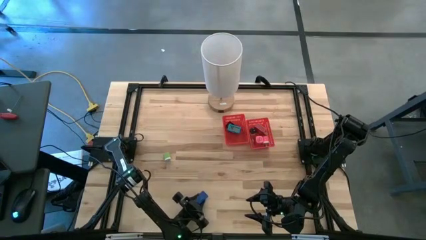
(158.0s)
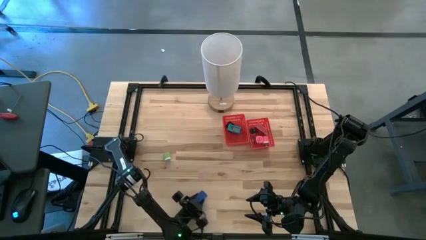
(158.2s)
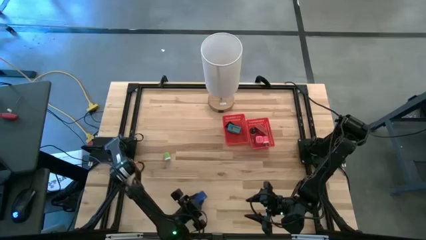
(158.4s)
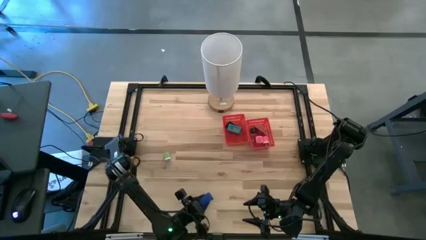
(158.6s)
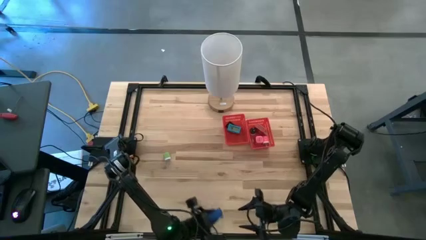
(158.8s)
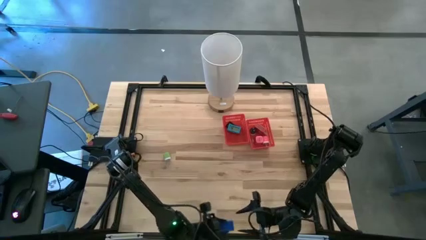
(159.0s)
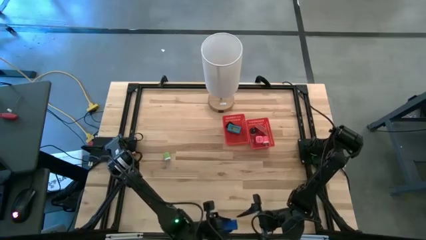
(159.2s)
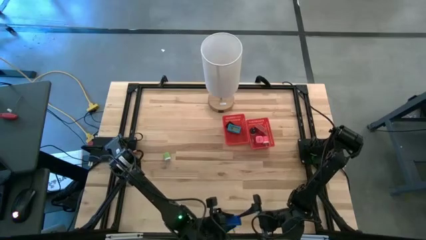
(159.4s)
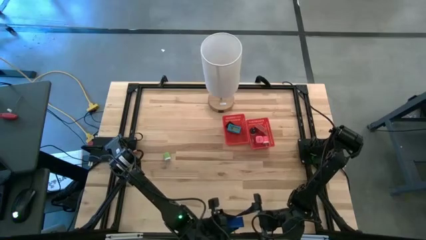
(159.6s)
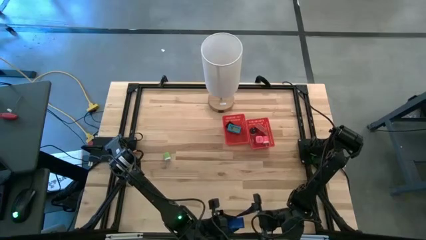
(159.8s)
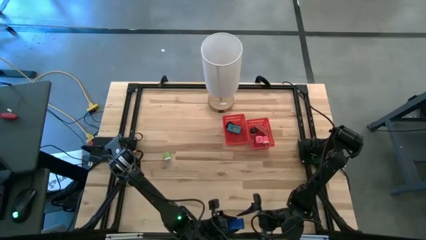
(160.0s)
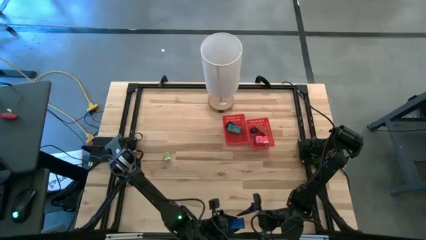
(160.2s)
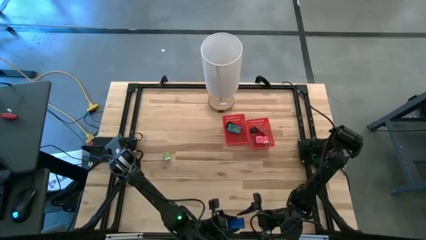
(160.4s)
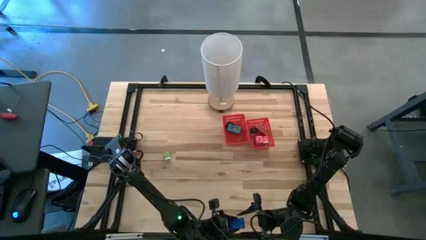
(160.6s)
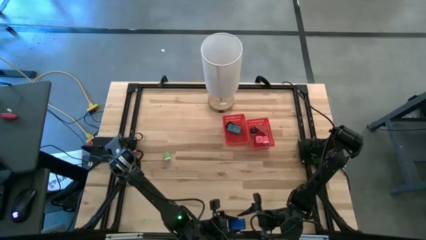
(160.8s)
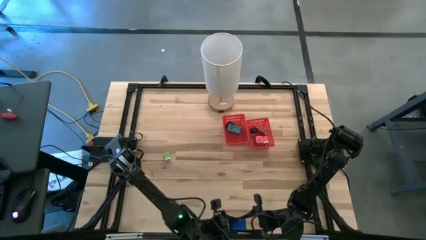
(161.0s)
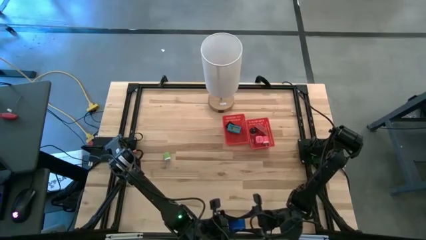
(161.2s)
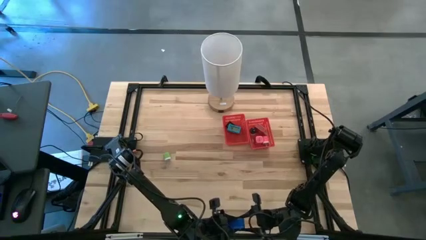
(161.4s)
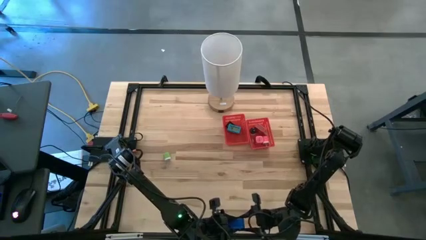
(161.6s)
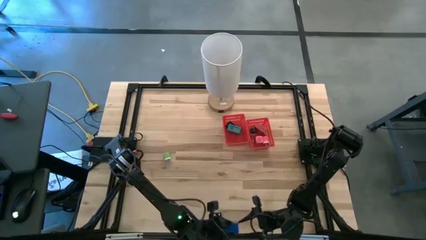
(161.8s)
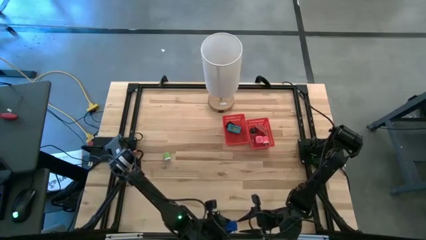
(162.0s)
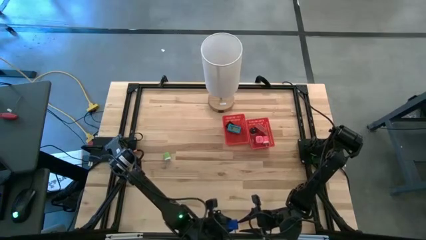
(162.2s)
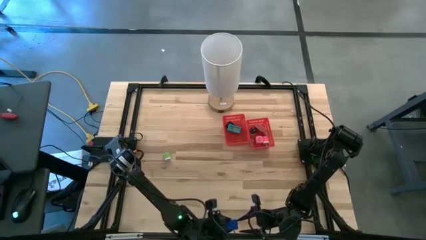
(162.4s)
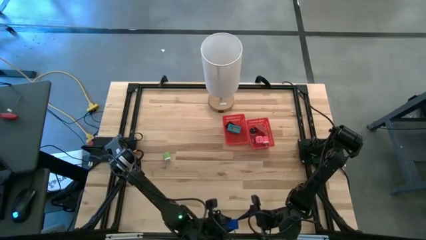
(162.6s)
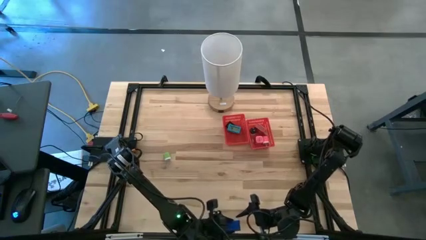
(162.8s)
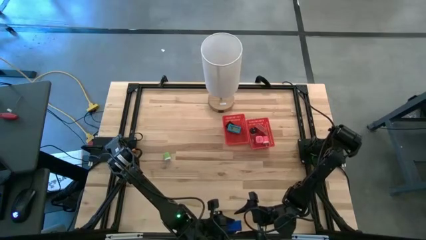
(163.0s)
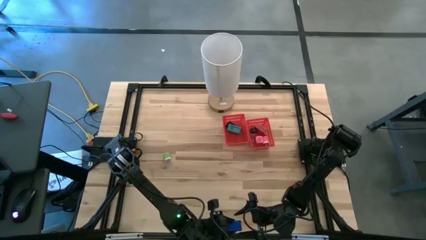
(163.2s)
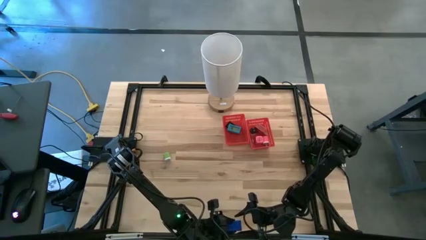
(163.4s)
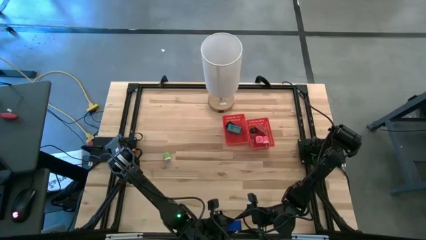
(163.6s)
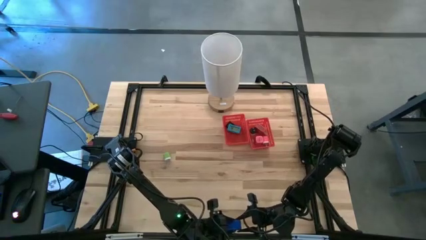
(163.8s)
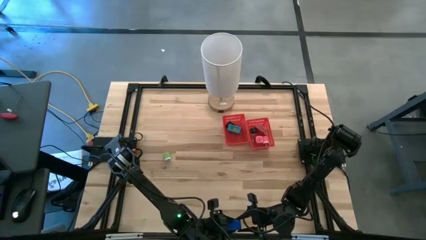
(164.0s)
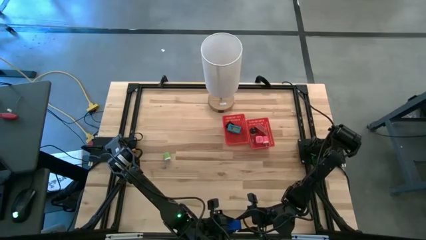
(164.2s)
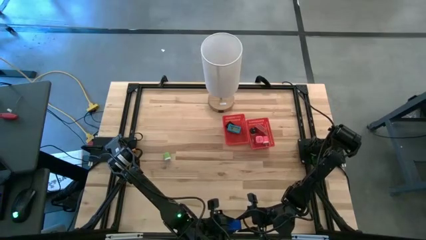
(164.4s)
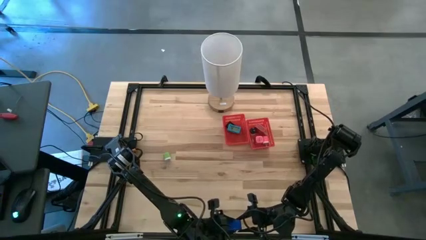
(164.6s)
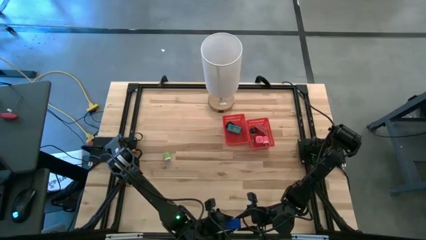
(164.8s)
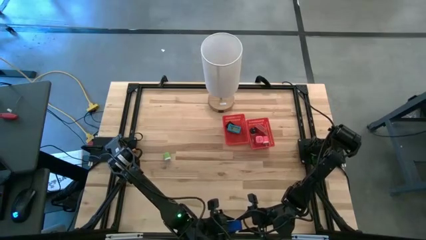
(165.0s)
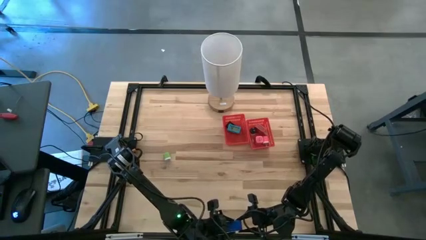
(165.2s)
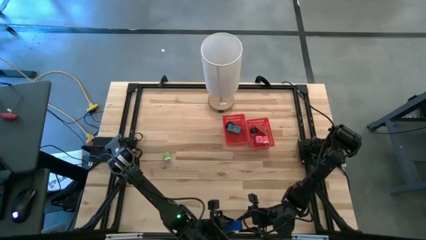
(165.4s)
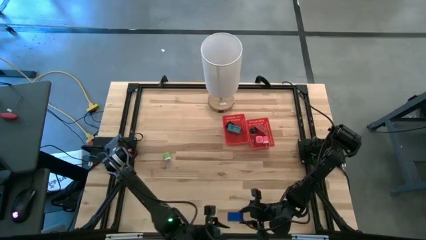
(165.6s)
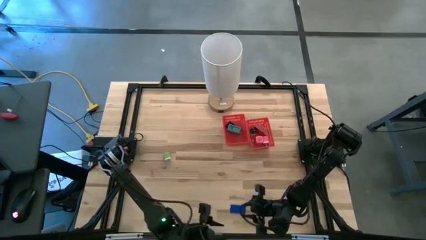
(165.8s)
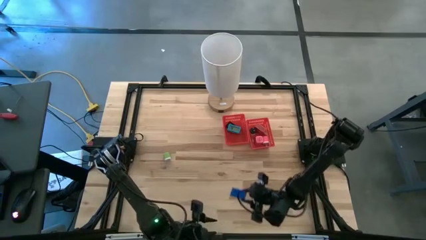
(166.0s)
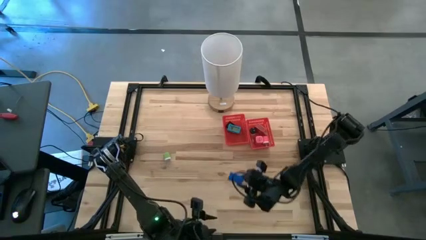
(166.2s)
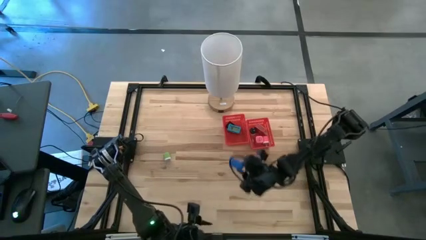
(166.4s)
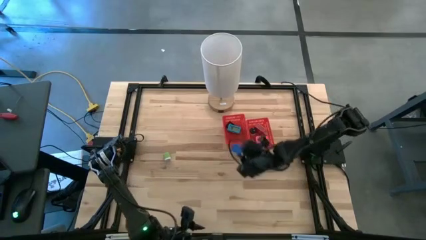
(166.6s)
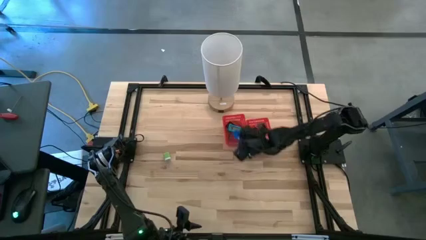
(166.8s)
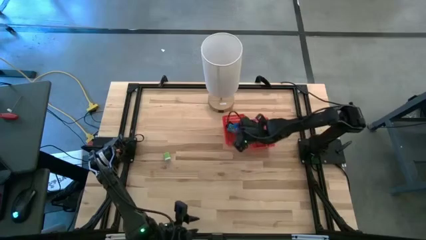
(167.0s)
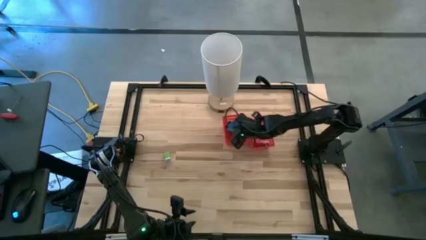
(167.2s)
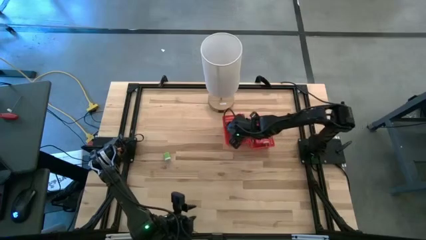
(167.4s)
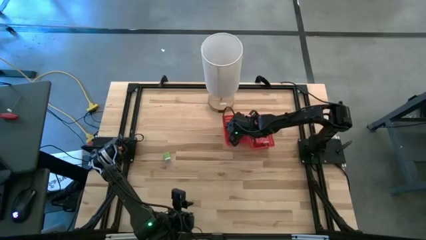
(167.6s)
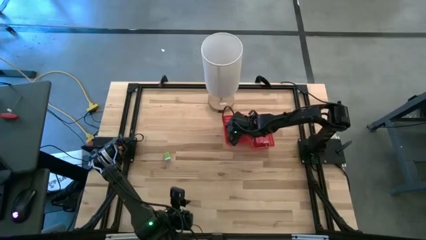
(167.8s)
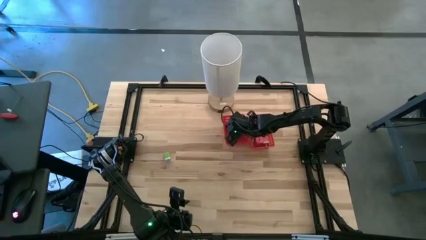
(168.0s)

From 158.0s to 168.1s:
Task: Pick & Place Office items
Put the blue timer into the left red bin

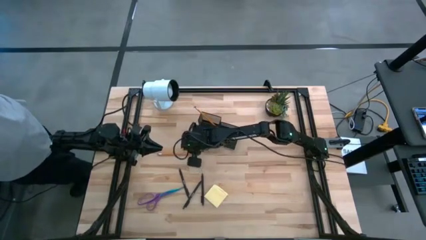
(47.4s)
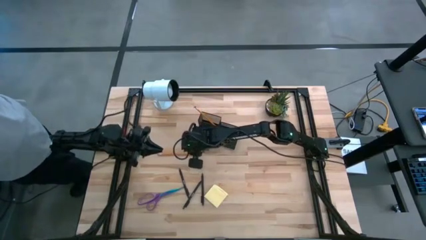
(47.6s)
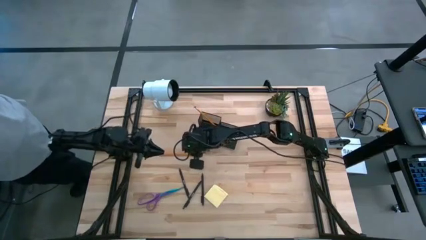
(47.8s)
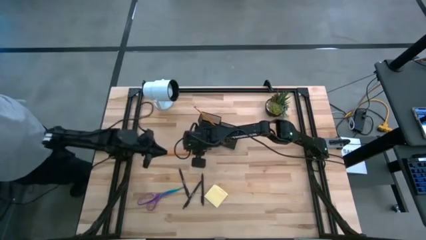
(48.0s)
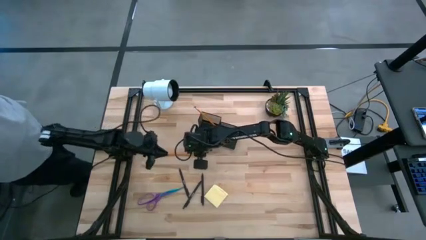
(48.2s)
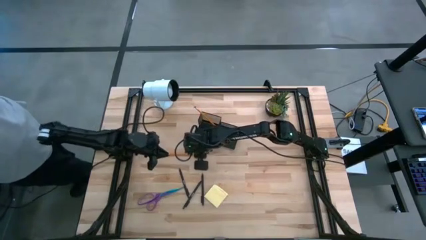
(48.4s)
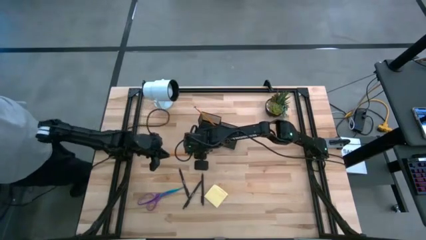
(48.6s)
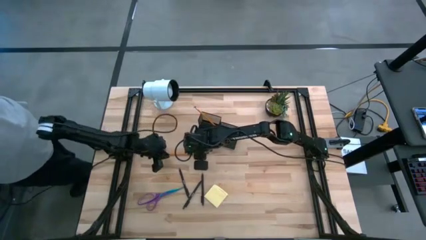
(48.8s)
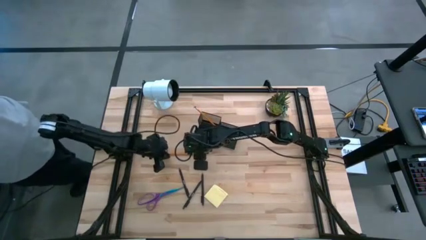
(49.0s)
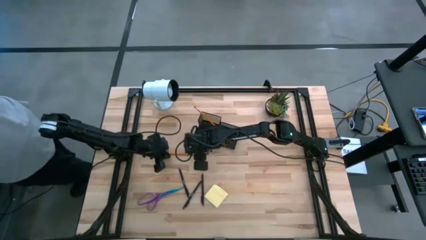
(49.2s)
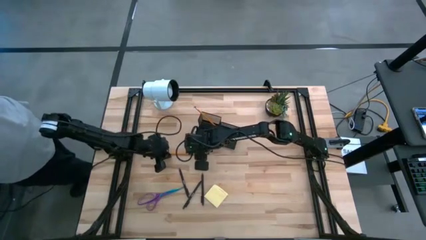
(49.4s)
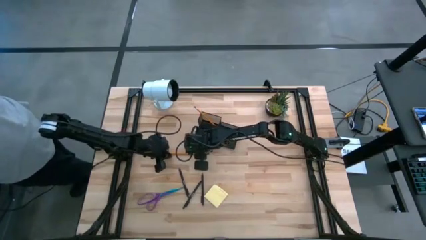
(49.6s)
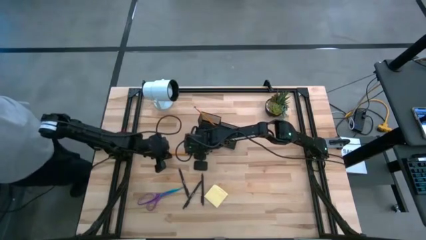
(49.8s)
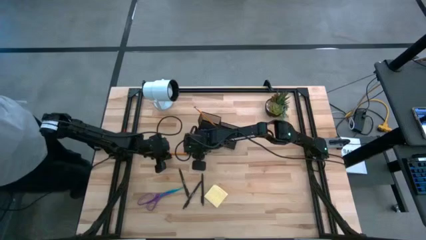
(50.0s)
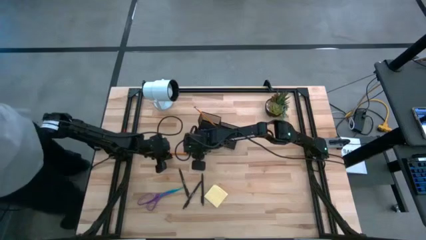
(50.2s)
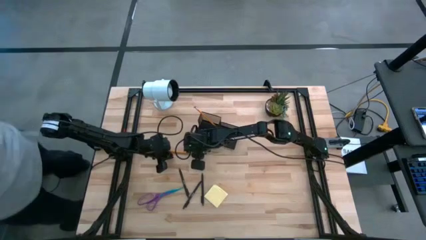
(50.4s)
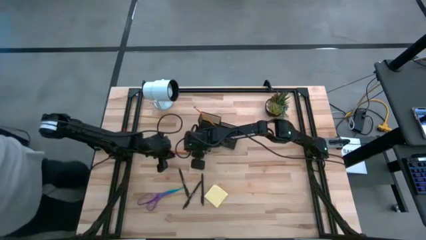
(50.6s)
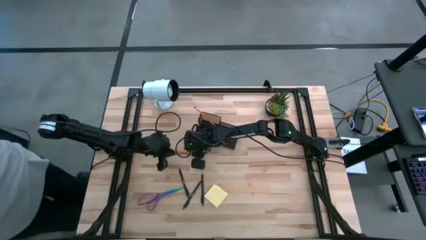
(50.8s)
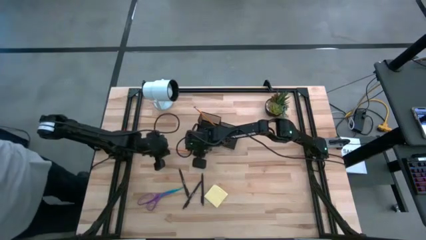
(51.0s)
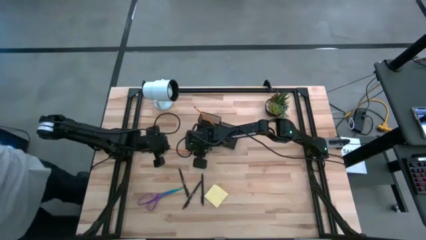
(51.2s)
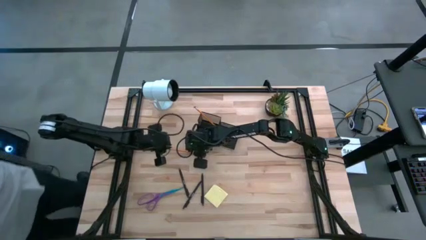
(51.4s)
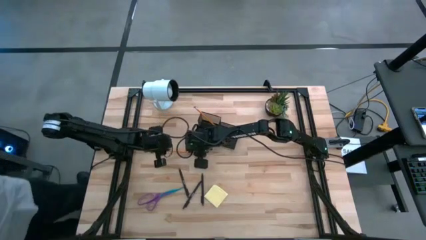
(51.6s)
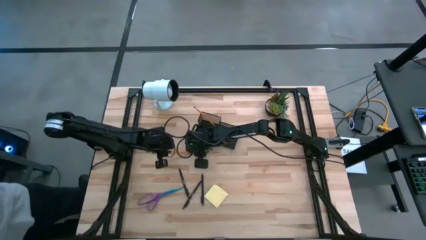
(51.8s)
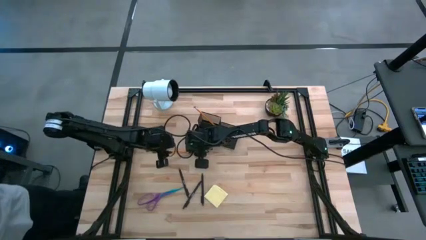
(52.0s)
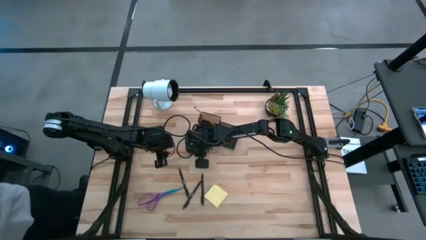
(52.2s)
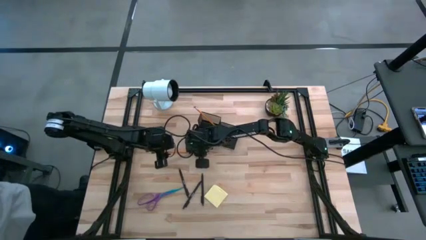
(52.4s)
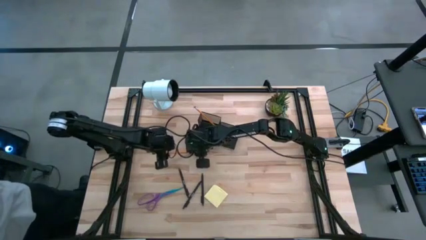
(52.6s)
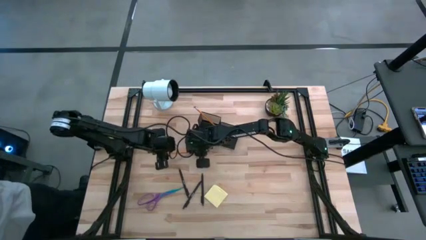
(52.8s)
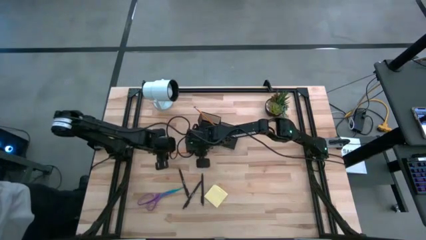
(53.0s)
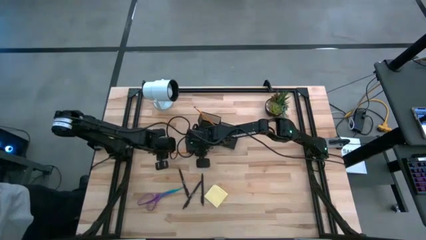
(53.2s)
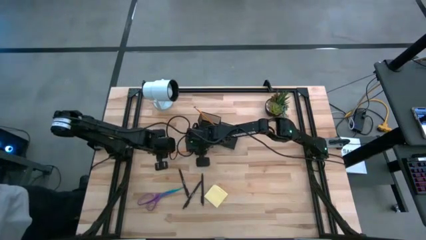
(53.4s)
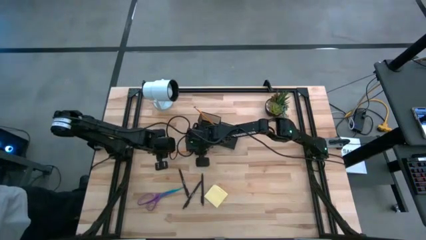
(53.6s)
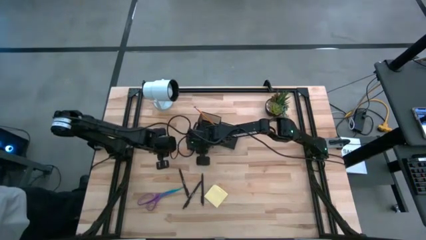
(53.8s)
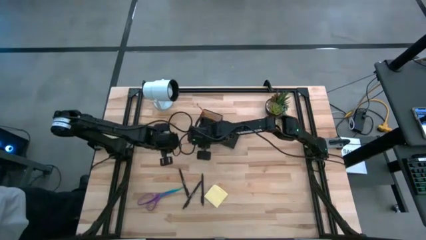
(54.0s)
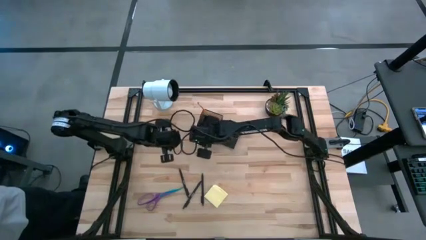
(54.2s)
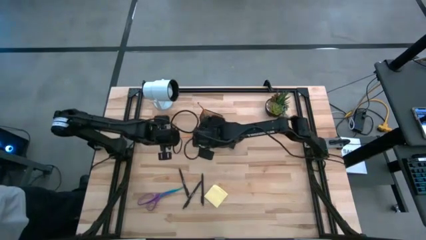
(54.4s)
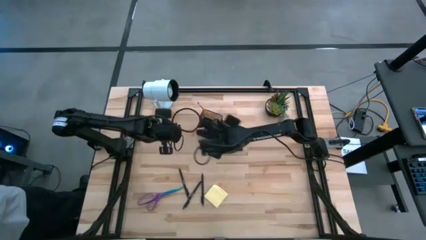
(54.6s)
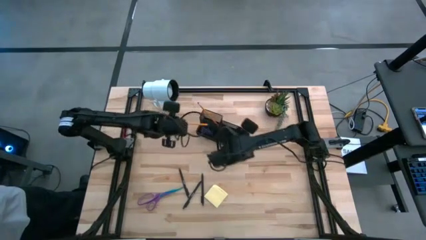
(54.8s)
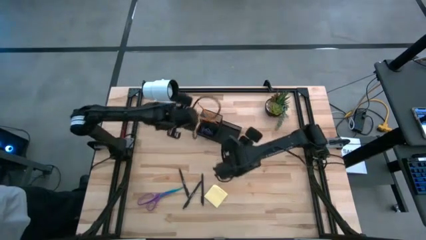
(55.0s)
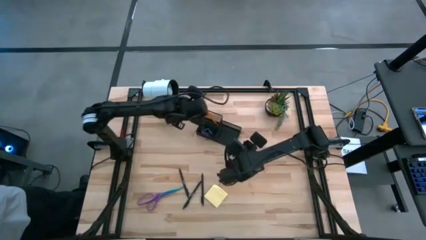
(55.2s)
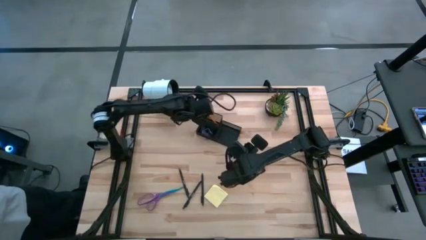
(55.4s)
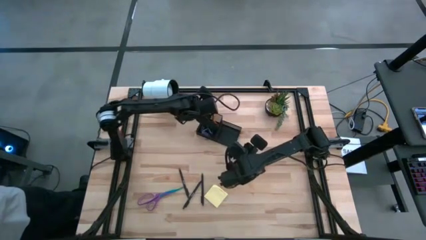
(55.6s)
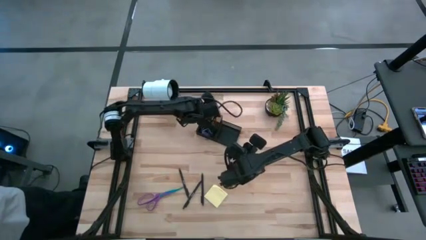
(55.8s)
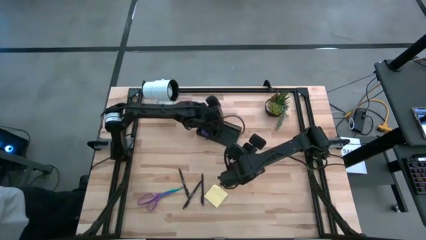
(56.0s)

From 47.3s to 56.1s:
Task: Pick and place office supplies into organizer
Put the orange pencil into the black desk organizer
